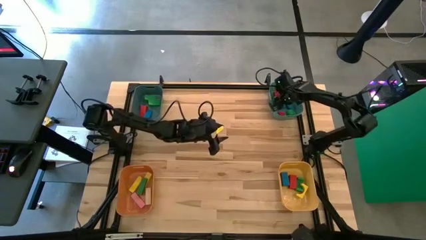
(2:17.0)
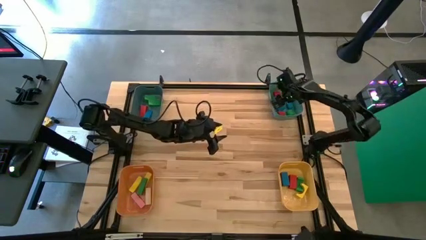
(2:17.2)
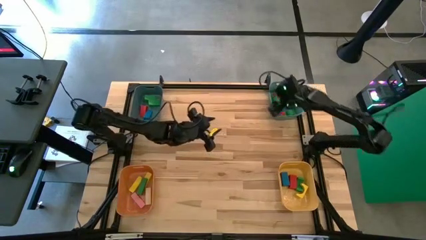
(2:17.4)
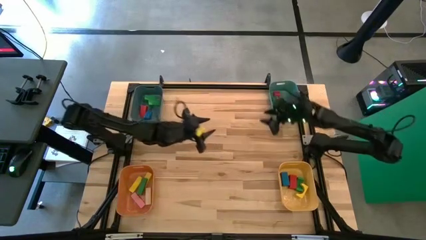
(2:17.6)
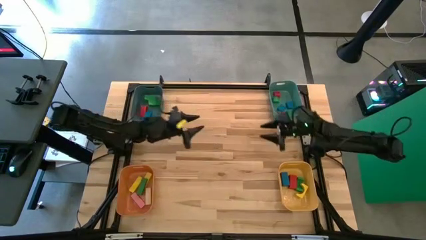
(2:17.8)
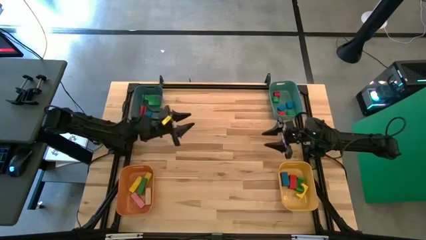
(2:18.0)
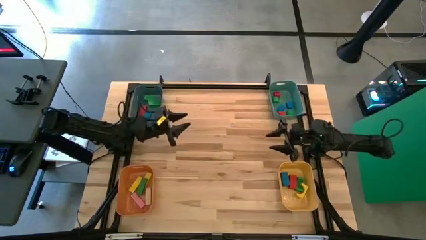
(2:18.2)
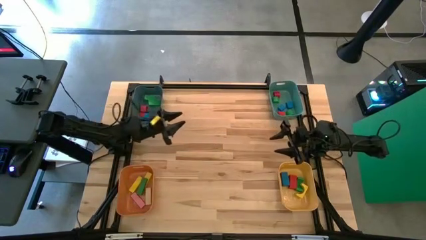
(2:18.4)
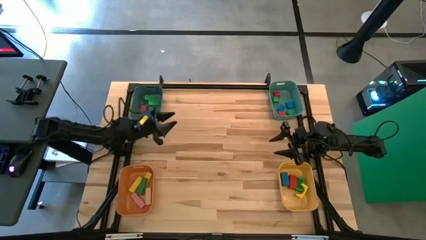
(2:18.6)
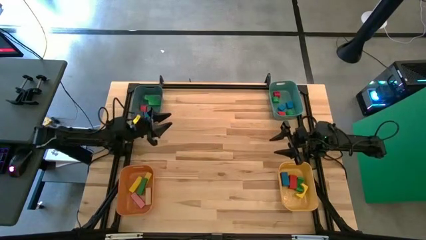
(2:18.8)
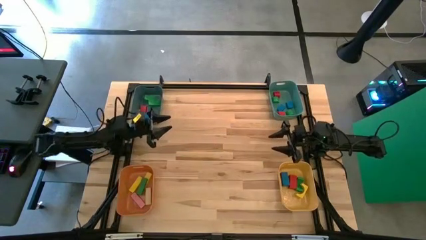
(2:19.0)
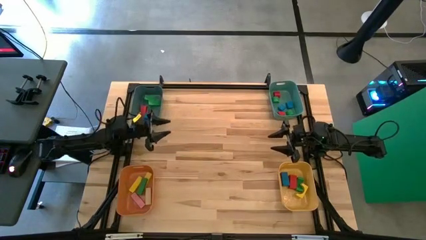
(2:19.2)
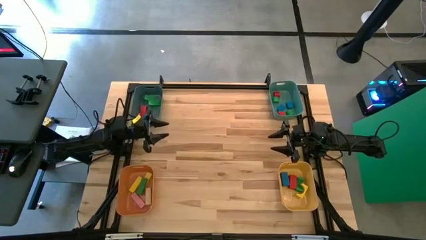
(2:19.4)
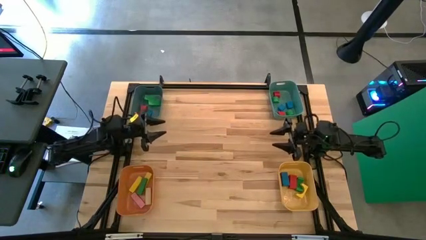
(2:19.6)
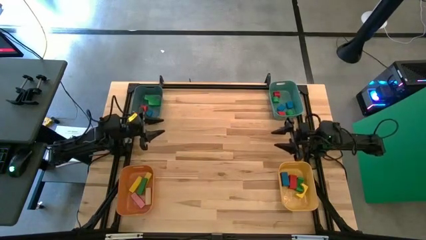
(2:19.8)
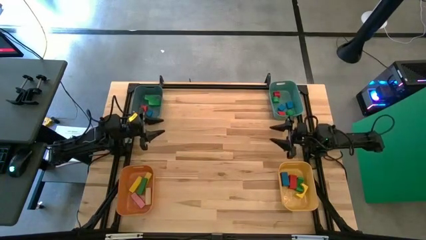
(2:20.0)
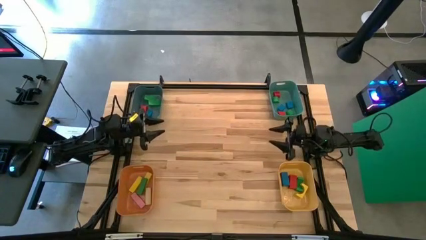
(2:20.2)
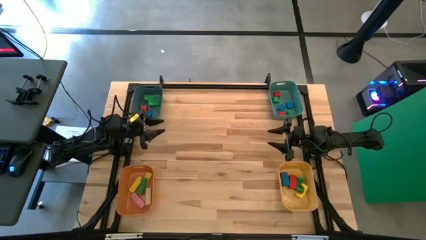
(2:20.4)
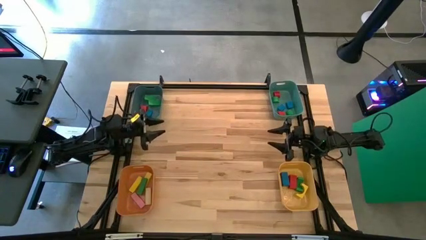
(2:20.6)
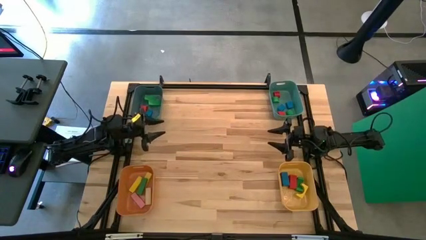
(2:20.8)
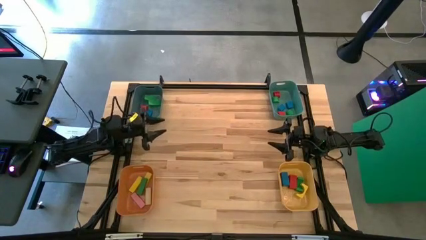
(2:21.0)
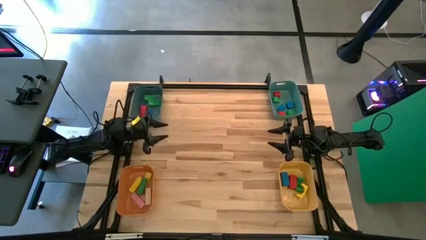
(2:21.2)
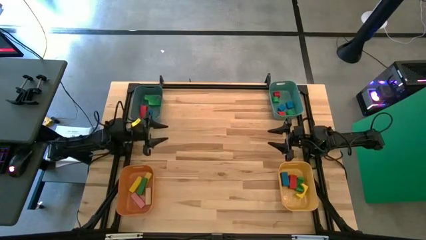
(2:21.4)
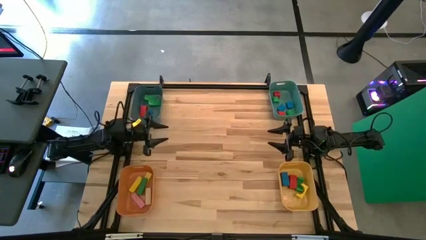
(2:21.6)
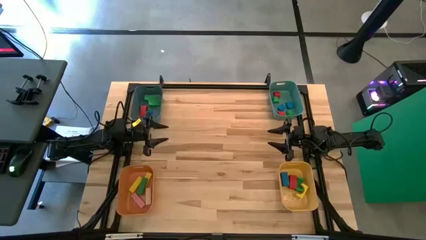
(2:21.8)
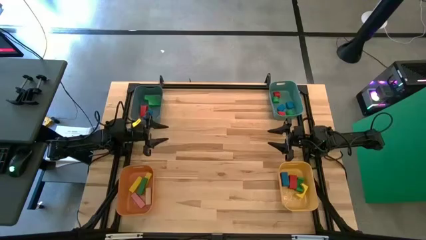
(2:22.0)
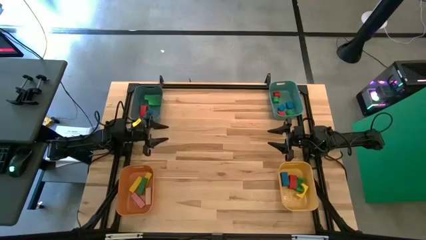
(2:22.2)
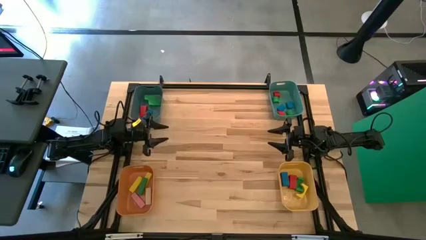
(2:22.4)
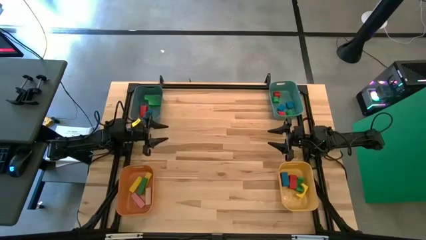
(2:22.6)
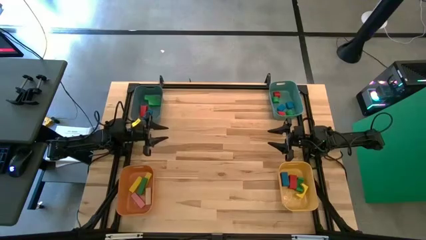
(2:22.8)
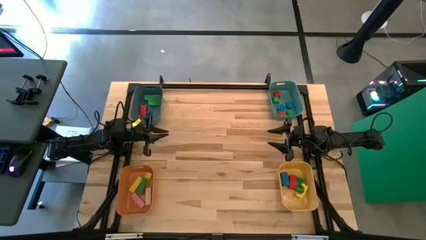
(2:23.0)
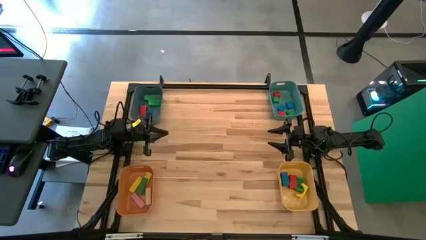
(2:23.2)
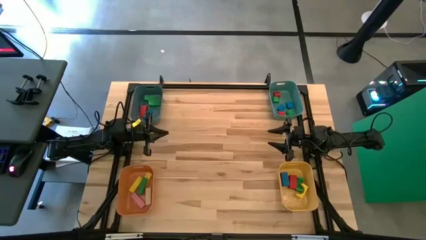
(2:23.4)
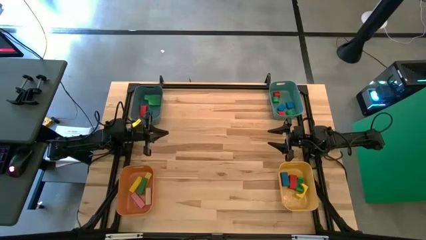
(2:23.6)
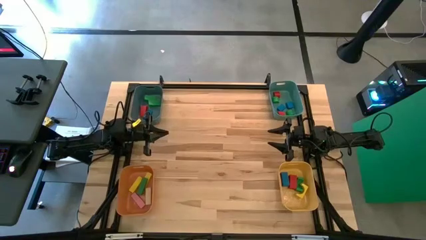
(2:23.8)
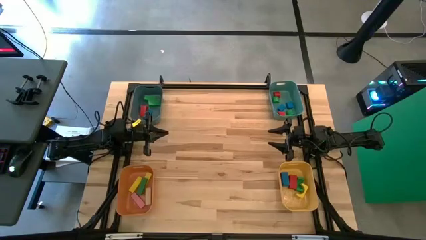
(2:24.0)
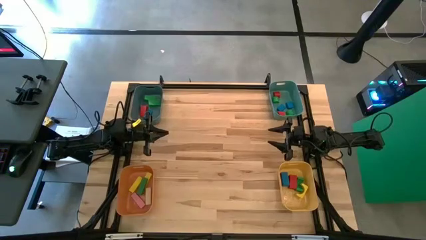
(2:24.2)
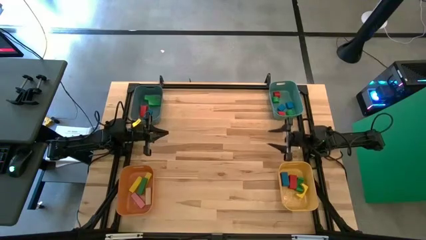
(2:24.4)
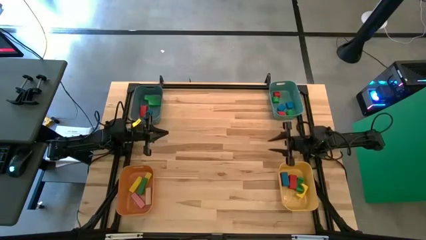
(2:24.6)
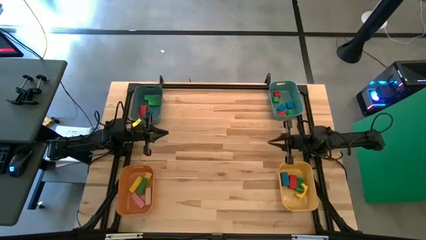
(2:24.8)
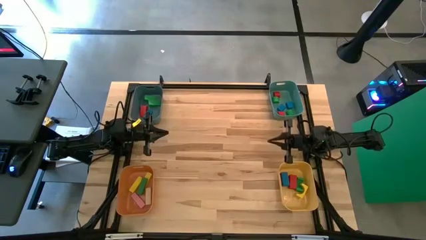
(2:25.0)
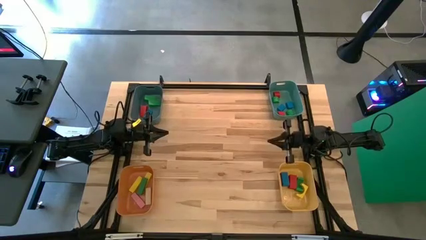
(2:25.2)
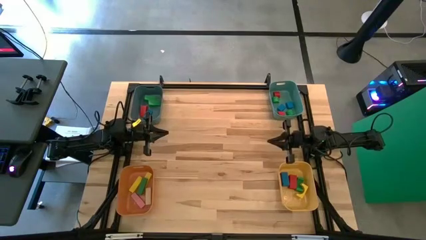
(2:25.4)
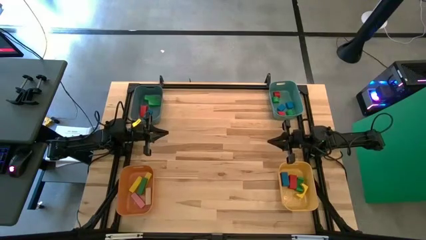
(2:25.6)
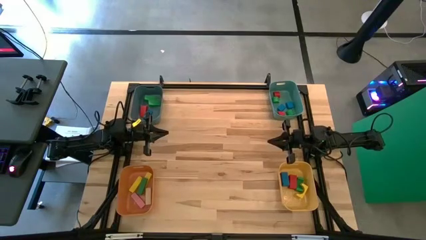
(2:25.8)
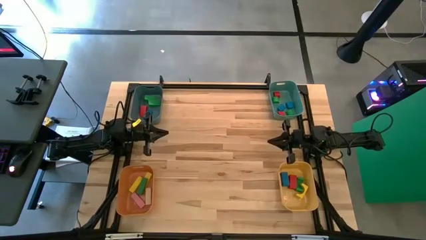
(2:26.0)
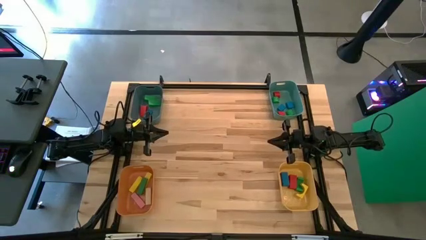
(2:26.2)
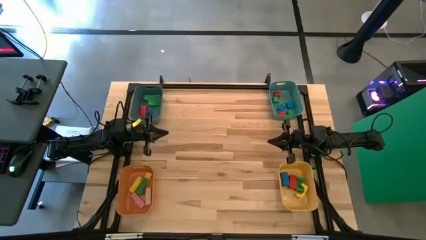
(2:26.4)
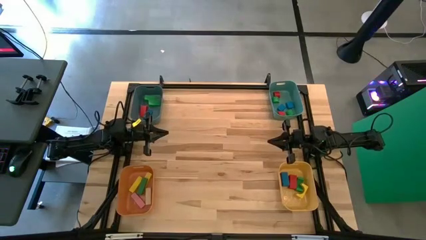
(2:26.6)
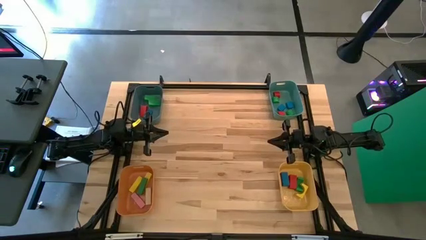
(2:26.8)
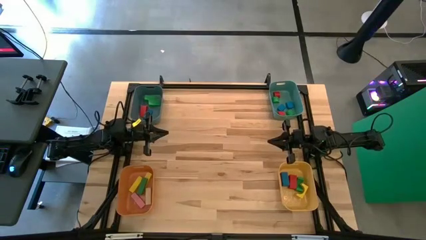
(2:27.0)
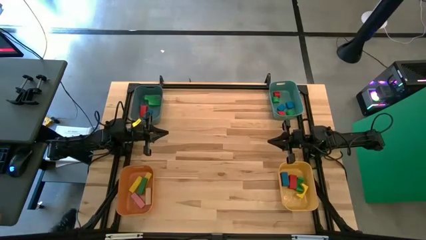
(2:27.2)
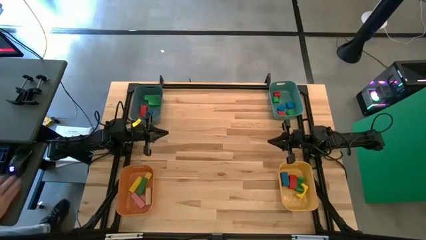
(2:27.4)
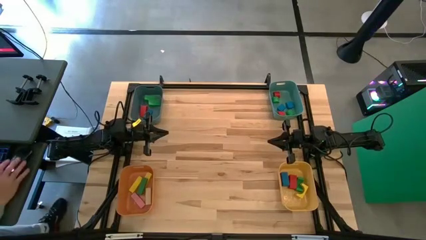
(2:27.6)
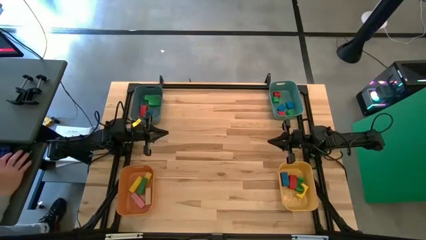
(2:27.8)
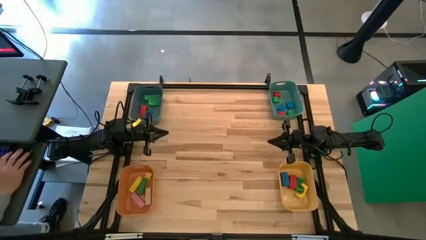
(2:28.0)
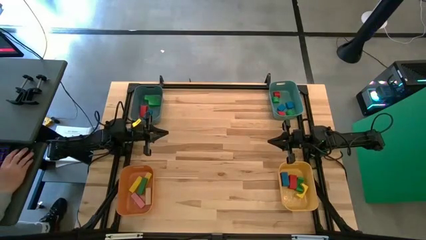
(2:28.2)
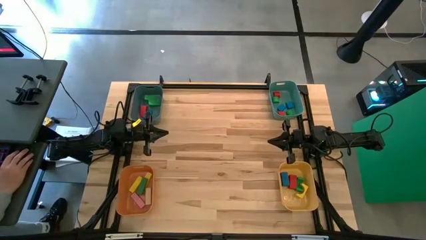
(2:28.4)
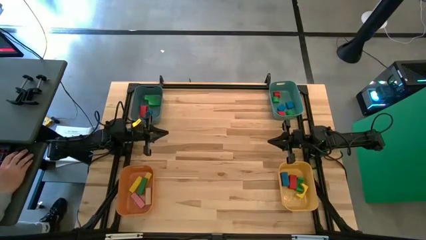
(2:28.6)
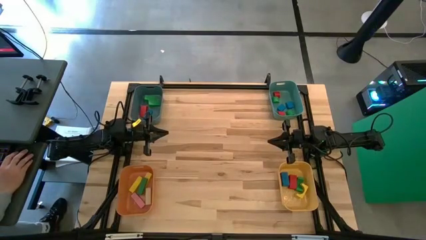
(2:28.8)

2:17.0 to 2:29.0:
Task: Sort blocks by size
Return to Home Position

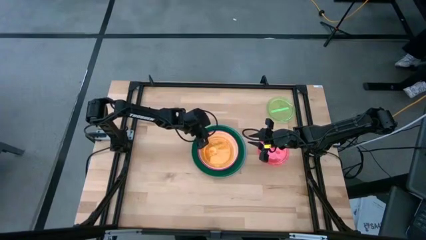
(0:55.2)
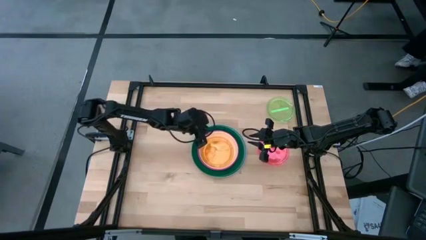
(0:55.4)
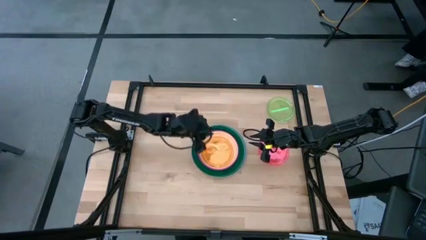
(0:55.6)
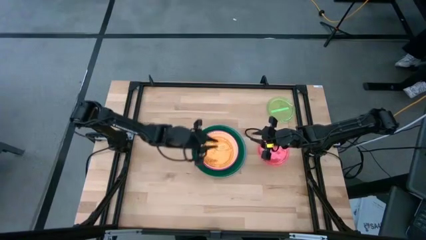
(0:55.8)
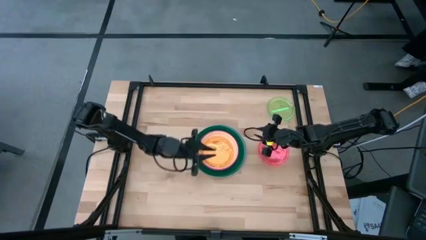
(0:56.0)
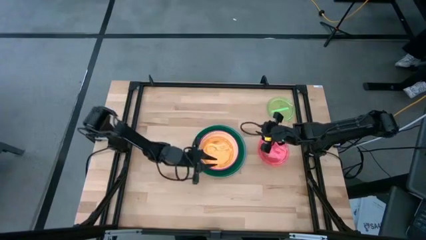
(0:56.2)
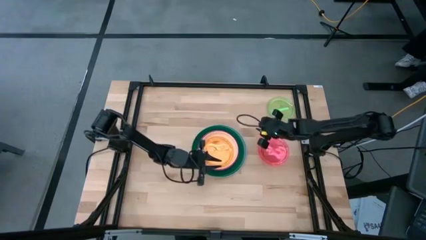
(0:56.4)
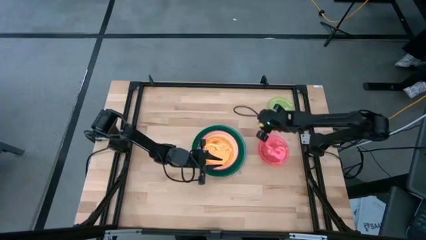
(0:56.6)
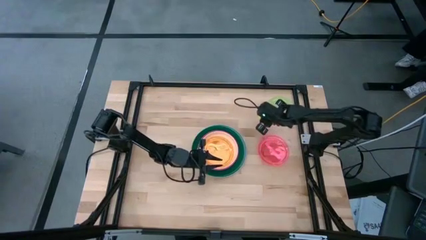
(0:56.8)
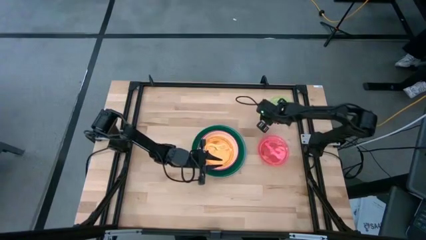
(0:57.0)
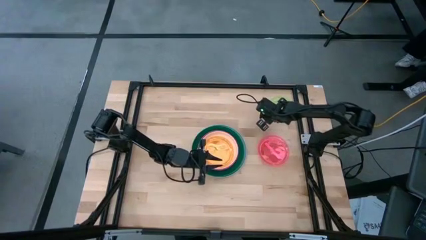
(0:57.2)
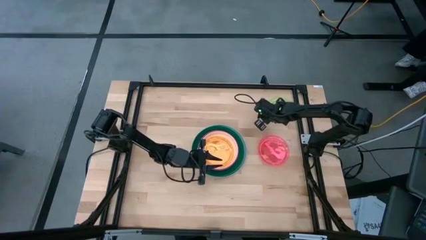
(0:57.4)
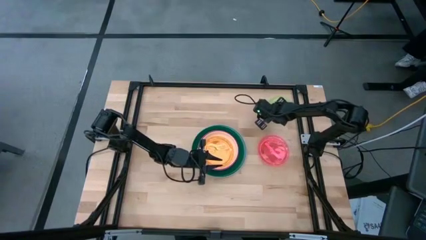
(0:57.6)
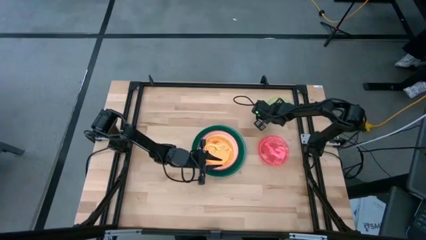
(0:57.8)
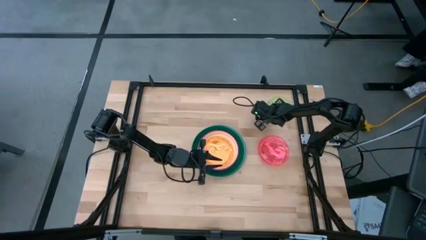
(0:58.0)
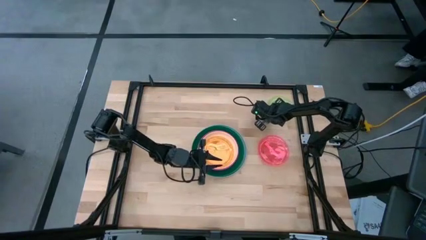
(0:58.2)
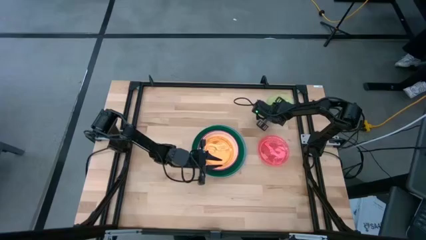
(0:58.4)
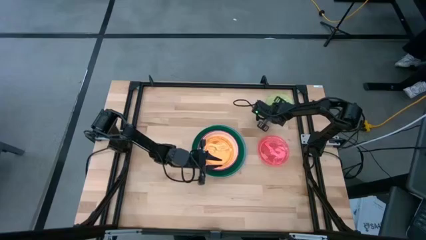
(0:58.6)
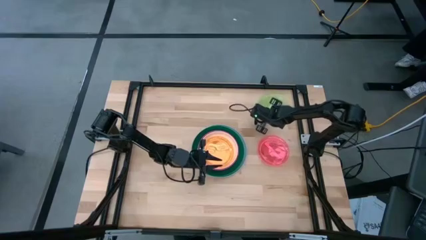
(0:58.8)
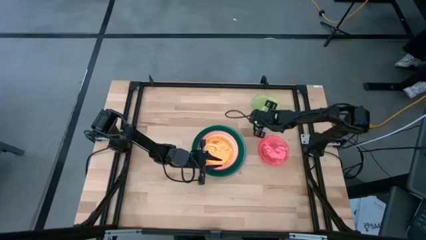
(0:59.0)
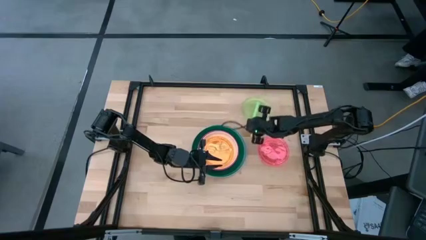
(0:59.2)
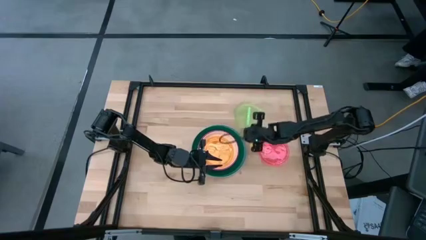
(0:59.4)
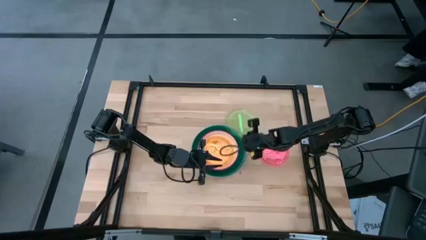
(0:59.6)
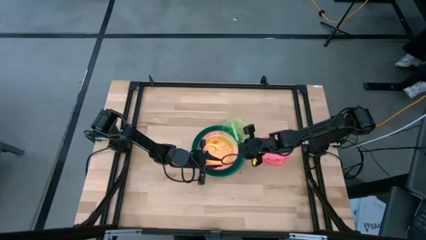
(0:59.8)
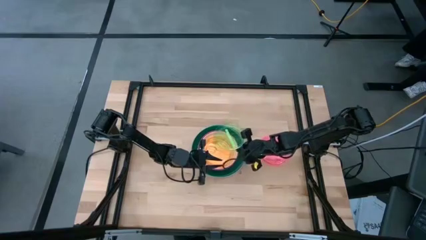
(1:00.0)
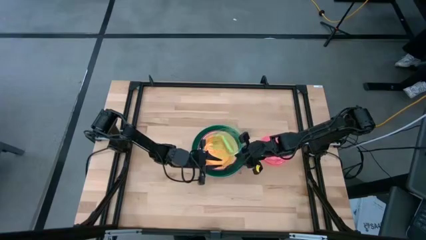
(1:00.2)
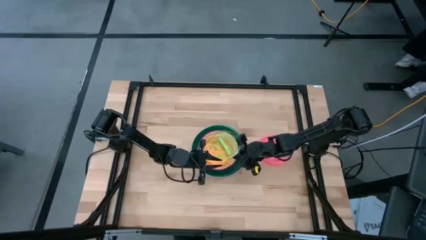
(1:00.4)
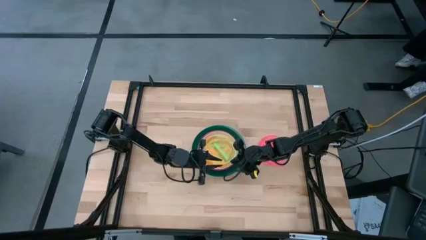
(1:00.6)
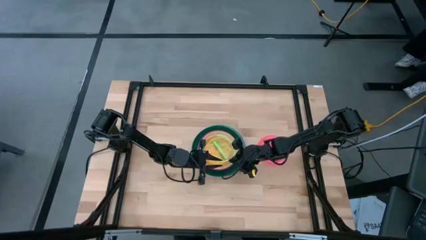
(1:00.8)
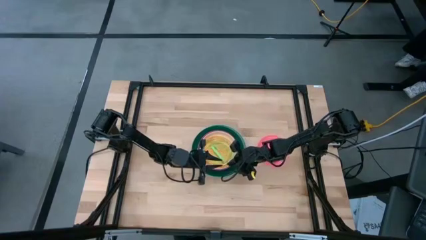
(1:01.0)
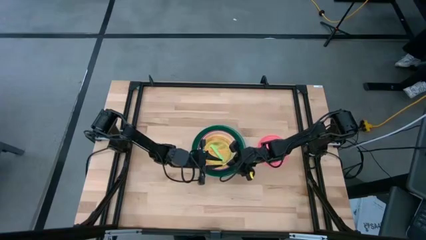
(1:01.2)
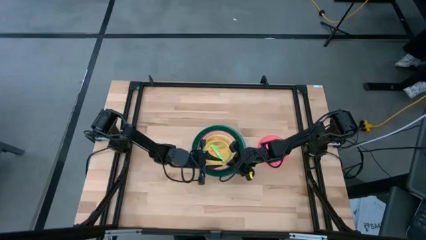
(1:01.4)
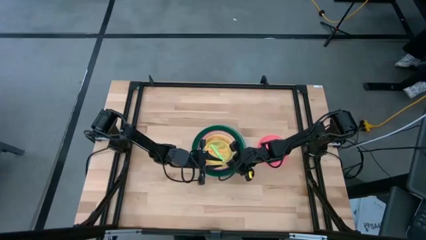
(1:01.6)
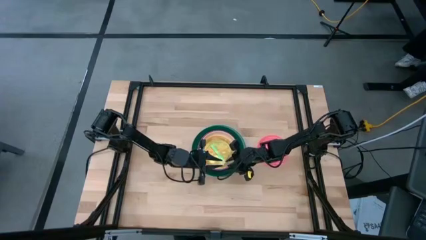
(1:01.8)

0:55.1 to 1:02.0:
Task: Stack plastic plates
Stack the light green plate on top of the orange plate
